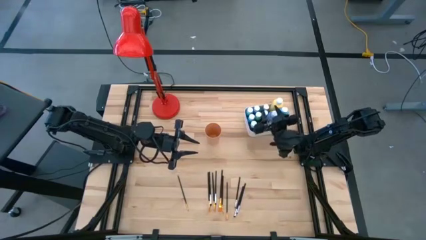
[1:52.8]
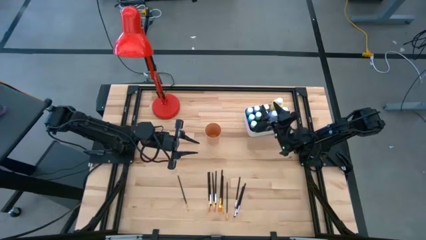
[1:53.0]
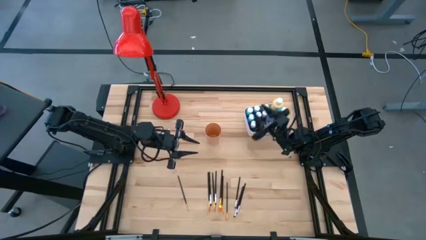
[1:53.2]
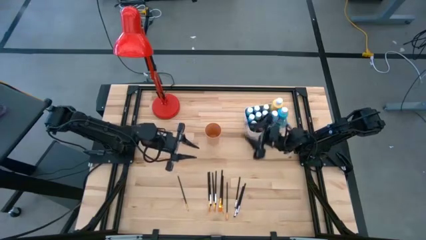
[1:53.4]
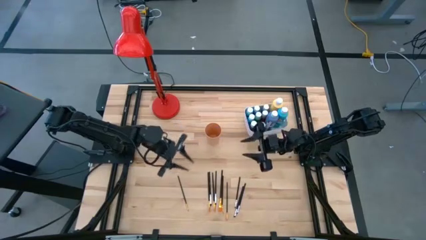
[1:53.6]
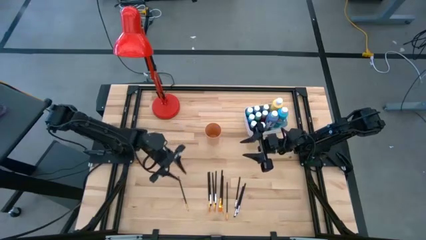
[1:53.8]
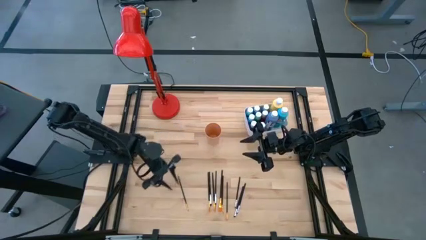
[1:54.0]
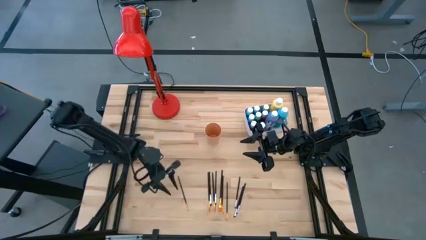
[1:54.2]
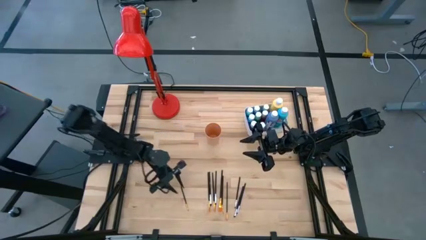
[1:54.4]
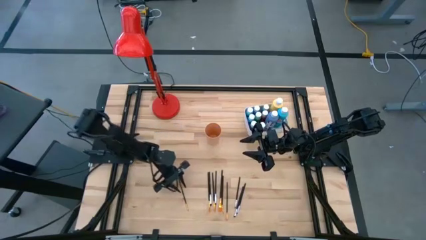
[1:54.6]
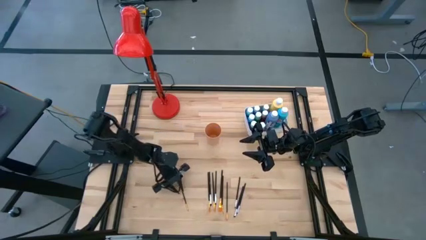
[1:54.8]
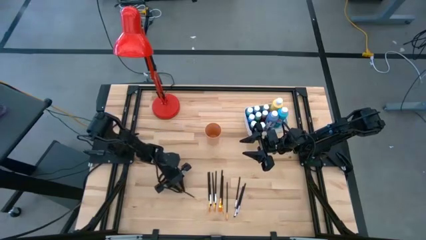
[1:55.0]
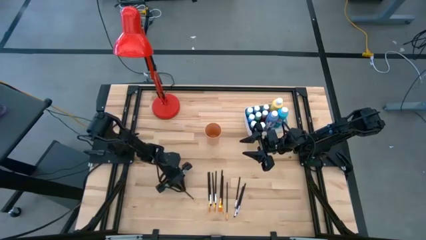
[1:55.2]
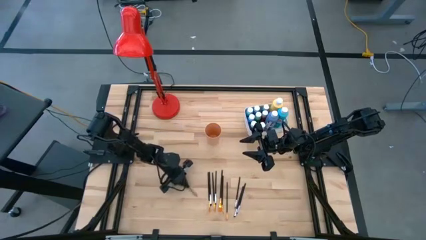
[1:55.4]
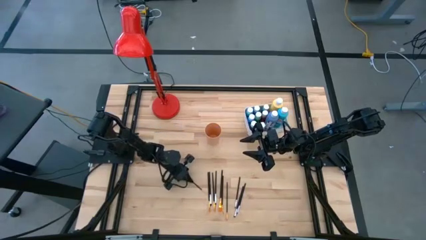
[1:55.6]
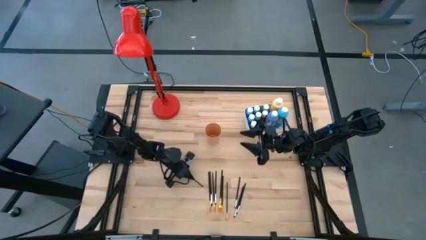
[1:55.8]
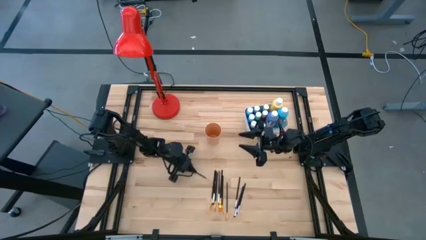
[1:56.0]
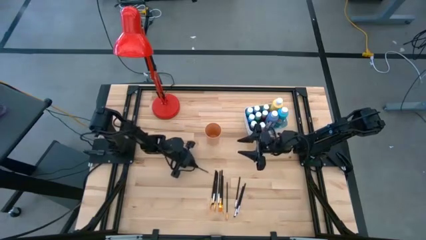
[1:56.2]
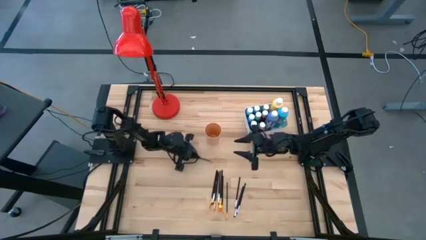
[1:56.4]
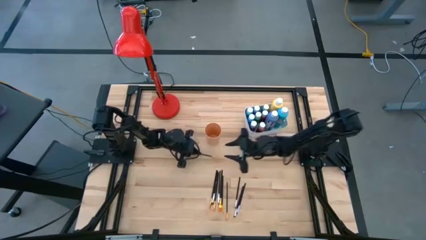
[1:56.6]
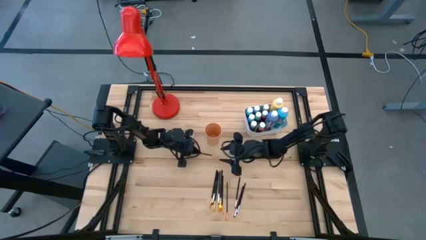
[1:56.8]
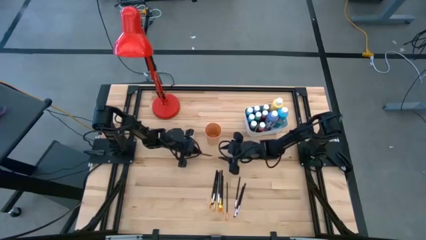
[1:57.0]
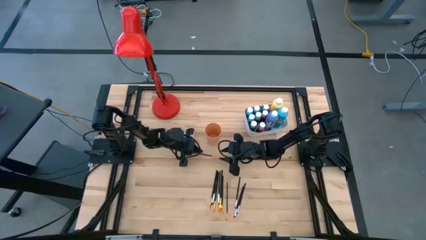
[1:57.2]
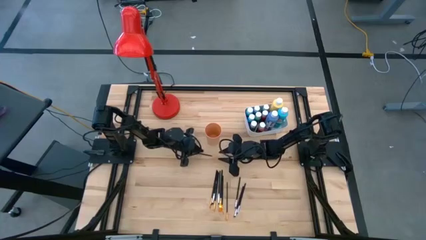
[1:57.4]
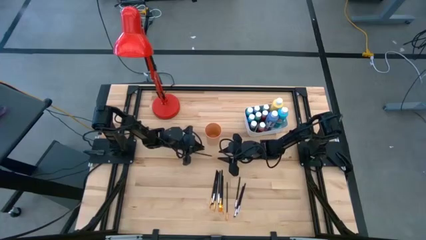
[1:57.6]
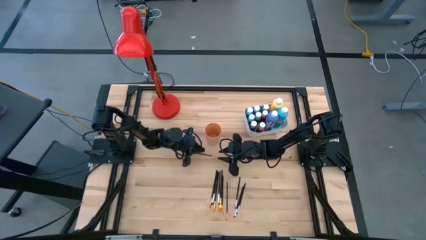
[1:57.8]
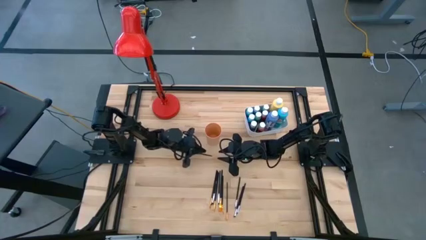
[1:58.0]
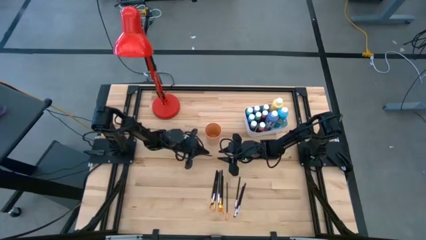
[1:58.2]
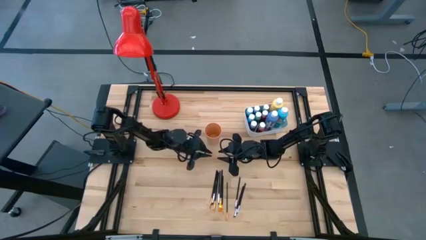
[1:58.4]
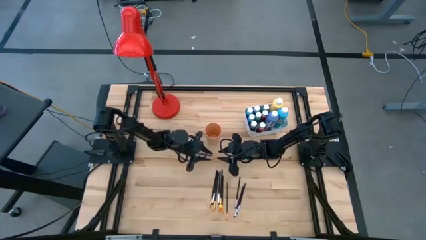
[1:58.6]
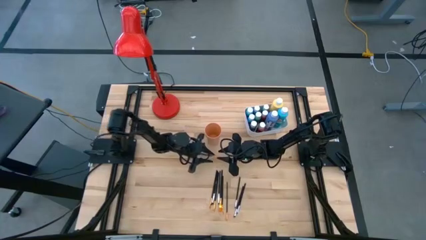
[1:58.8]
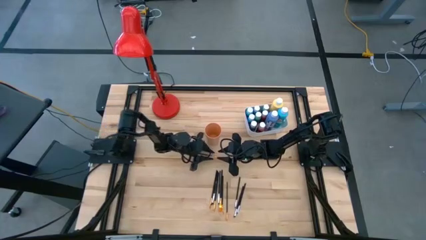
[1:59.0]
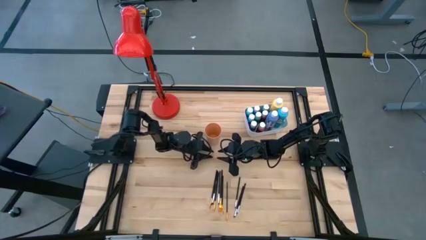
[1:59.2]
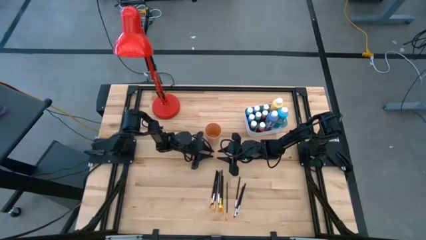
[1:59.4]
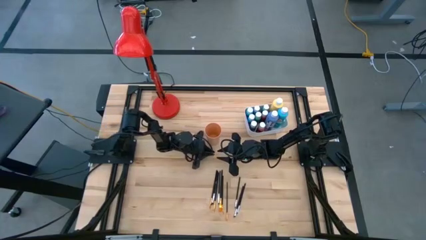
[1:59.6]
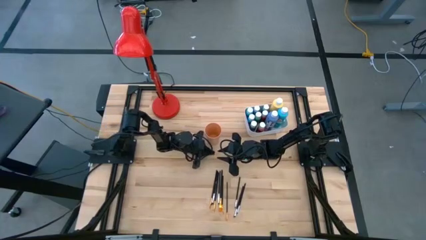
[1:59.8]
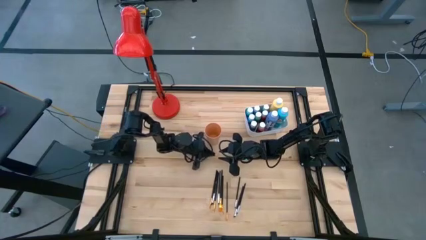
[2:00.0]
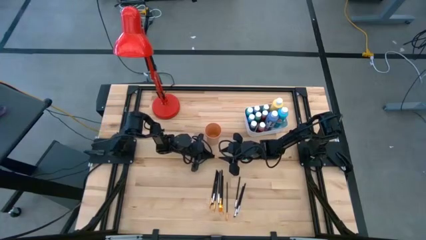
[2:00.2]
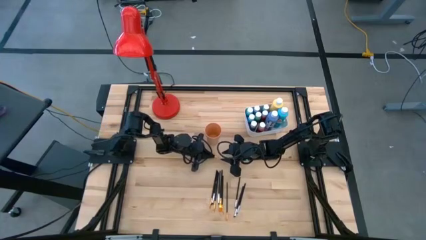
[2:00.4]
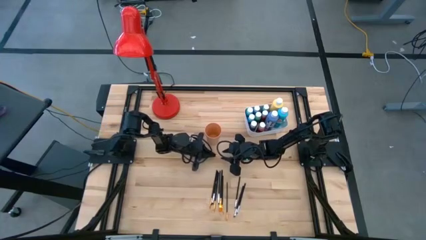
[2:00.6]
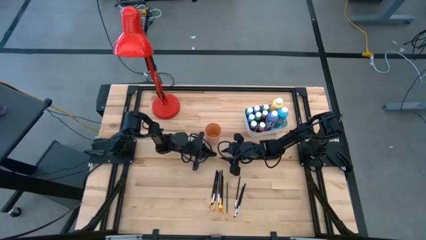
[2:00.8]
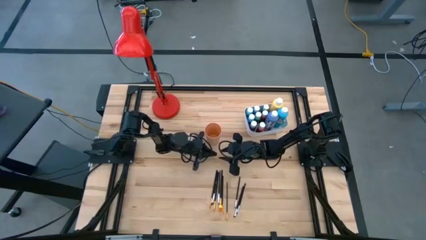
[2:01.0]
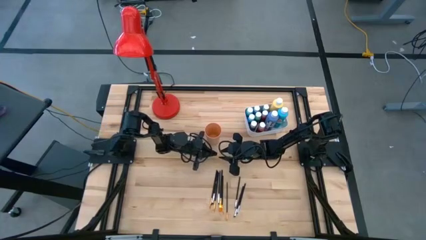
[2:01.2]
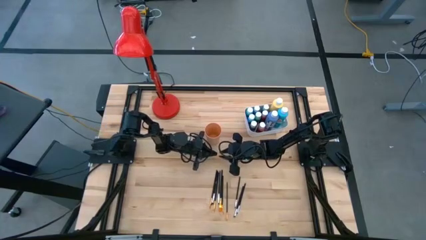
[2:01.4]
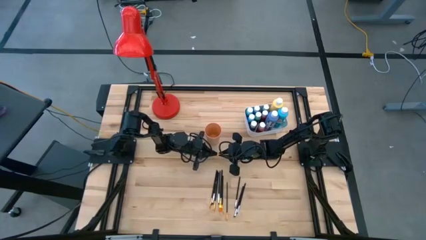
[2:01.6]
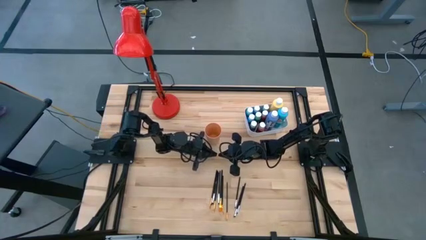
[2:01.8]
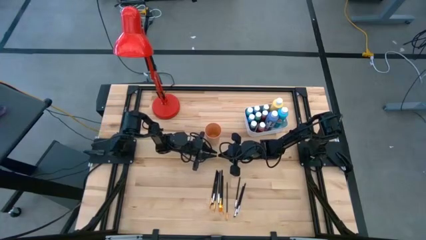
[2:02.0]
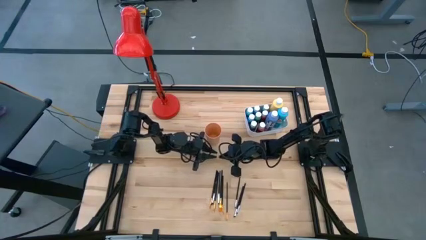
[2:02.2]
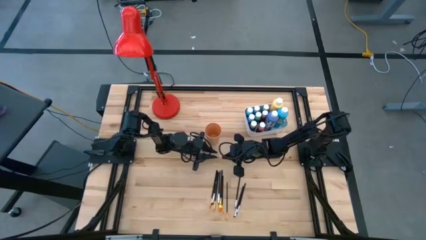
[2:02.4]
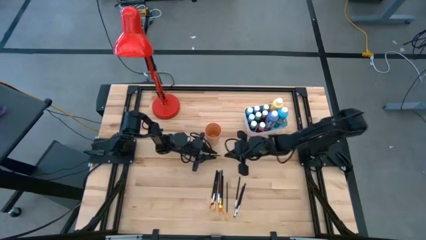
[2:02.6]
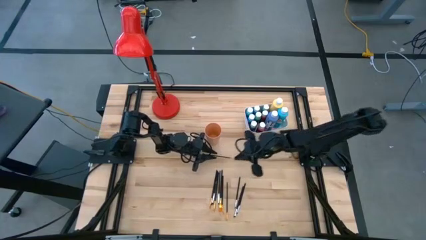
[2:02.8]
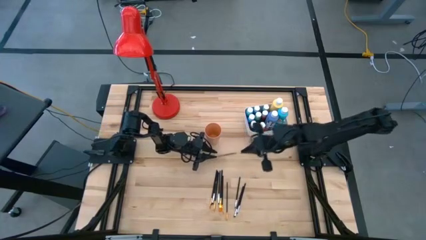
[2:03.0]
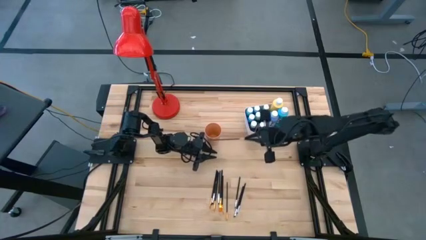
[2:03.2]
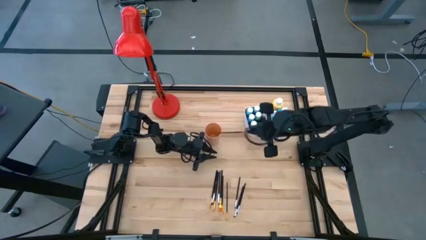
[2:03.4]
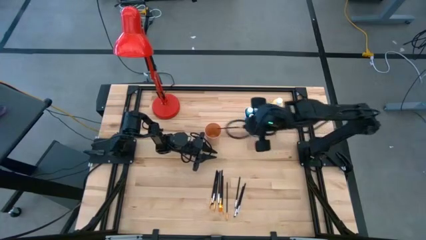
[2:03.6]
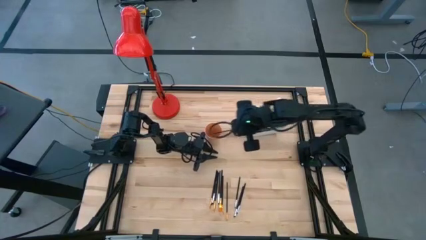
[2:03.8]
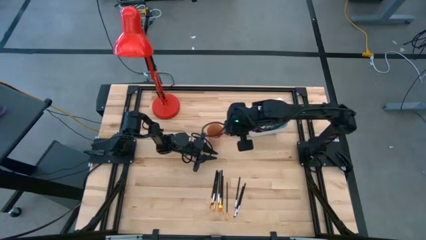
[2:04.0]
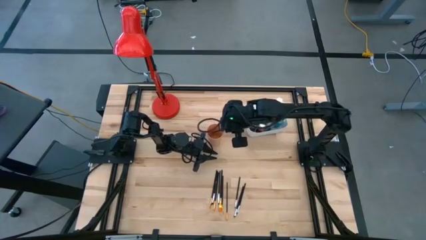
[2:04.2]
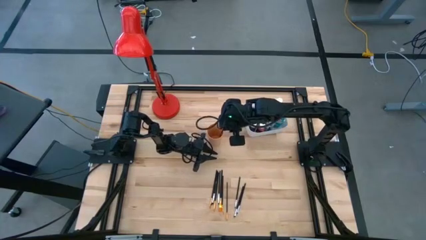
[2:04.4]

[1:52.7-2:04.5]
Task: Pick & Place Paint Supplies
Put the orange paintbrush into the orange cup

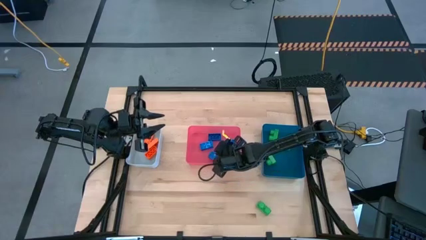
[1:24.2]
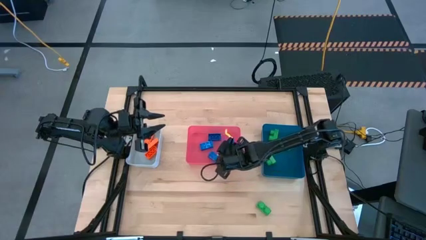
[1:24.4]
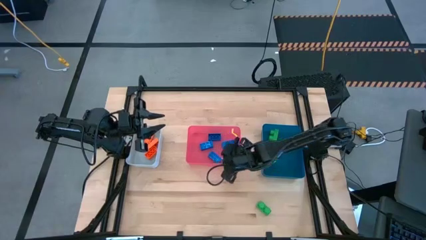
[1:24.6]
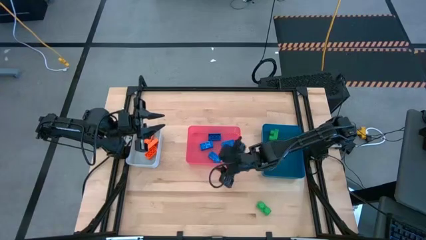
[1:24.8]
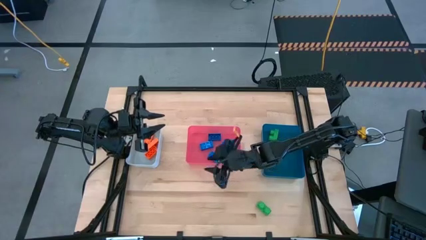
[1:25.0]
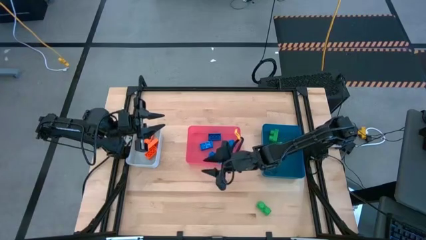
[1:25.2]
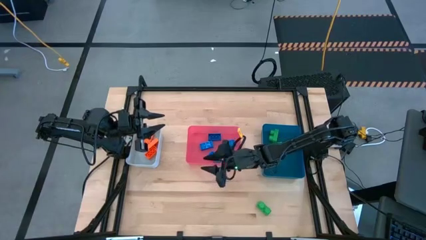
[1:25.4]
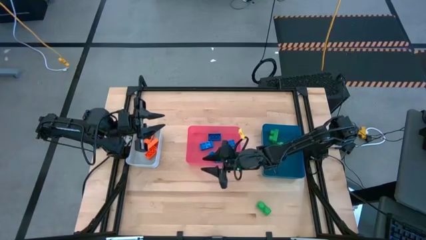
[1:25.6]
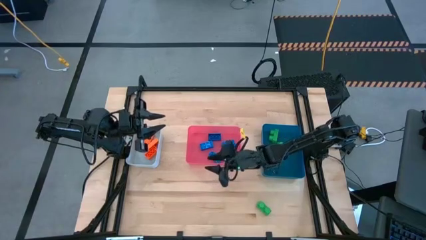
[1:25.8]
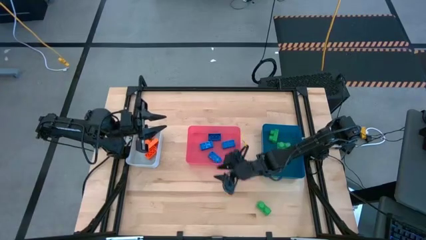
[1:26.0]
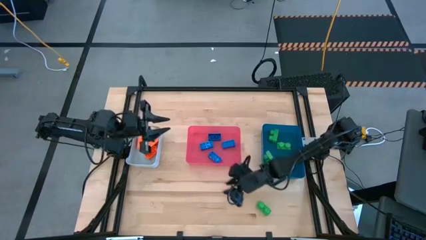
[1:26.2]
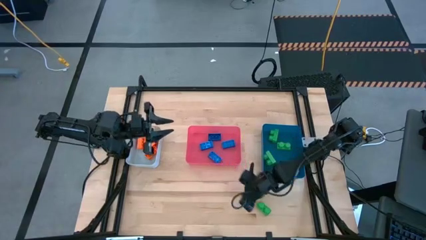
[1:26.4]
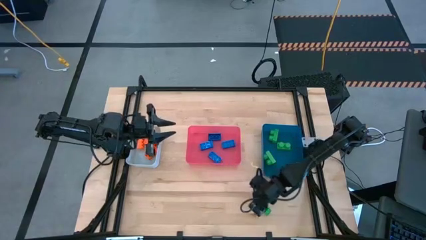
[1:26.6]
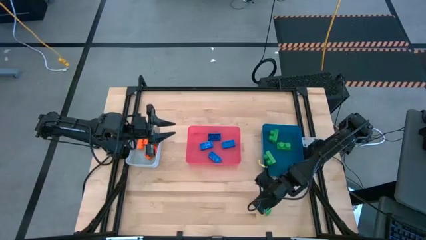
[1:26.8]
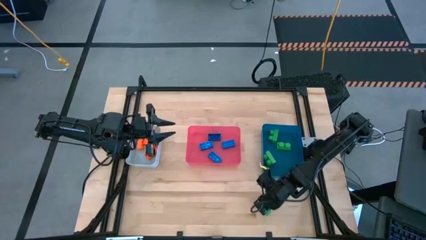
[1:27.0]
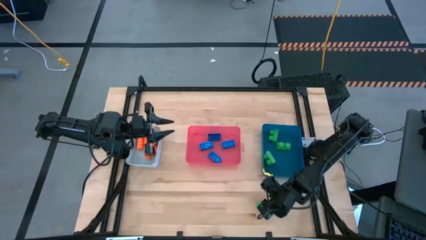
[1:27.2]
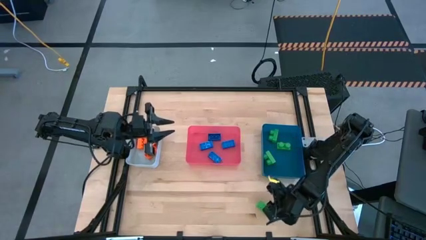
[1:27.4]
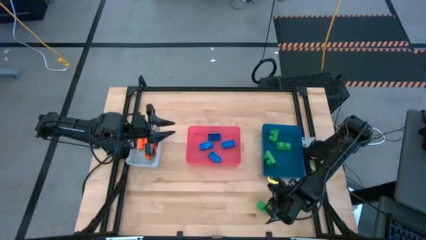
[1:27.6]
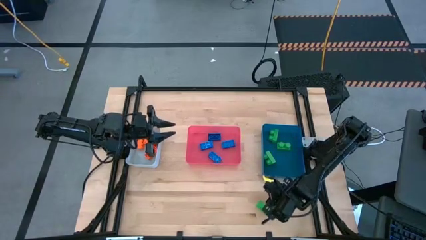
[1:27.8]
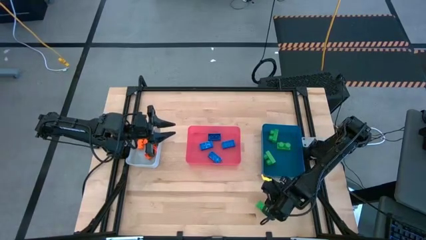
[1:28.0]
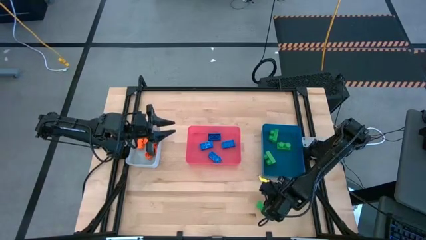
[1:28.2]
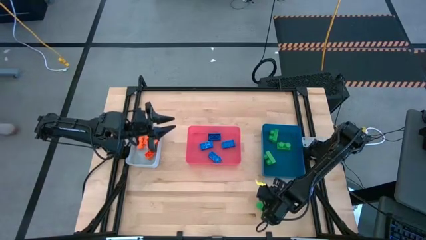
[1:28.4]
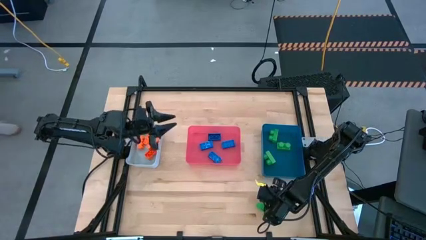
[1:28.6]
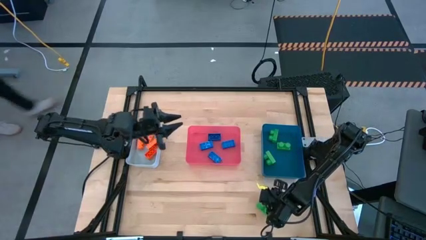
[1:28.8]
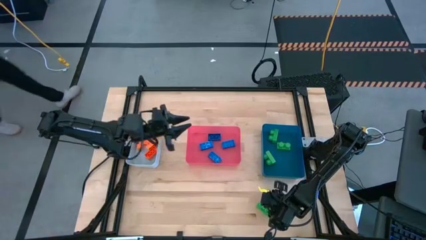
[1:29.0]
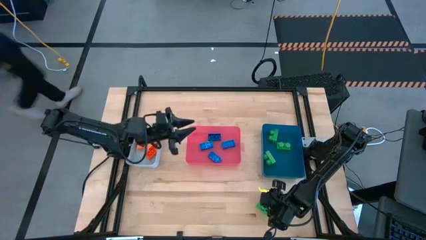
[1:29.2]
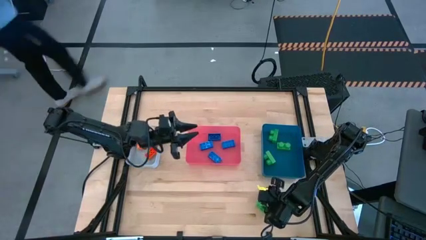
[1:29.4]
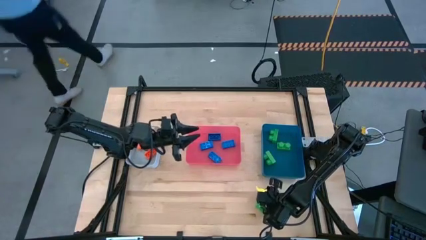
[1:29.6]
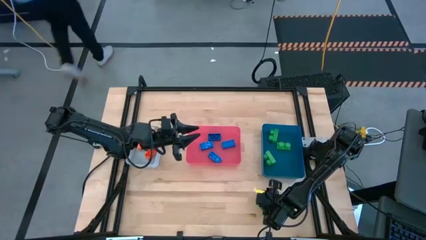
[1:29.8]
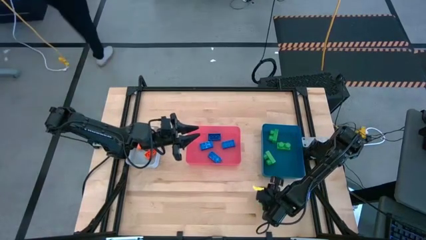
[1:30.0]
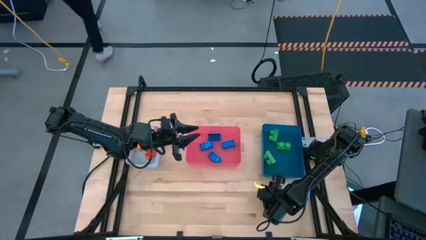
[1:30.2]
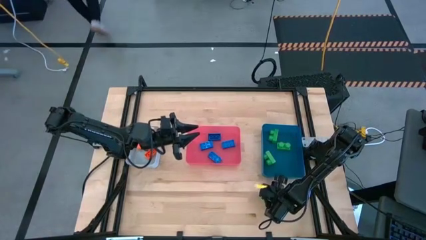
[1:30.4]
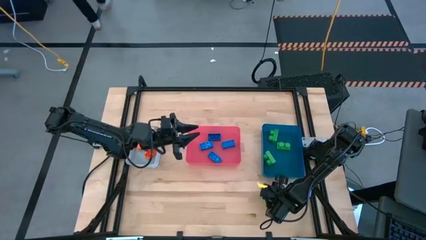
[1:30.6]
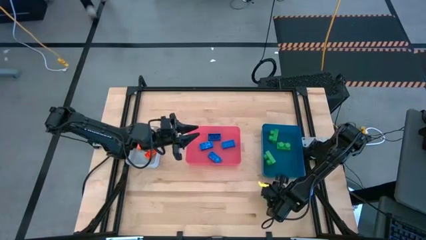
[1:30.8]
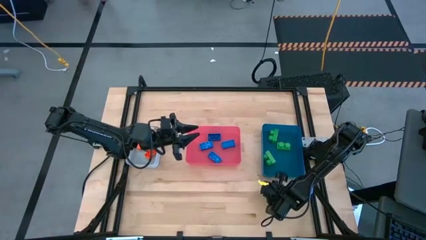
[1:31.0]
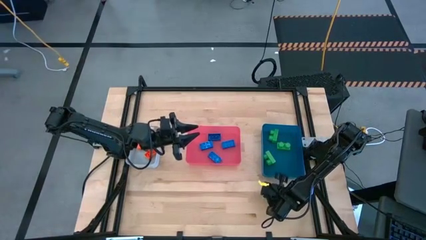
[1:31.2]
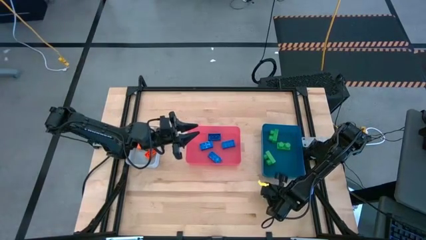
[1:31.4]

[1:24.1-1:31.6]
Task: Sort & place blocks by color
Put the green game piece into the blue bin
